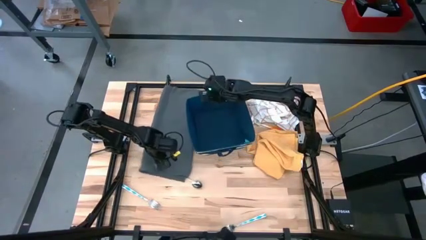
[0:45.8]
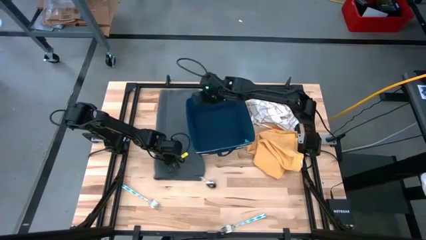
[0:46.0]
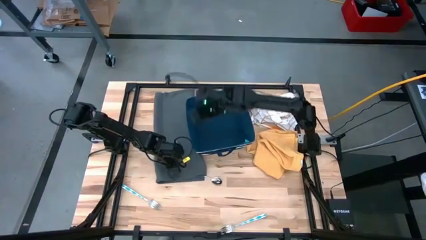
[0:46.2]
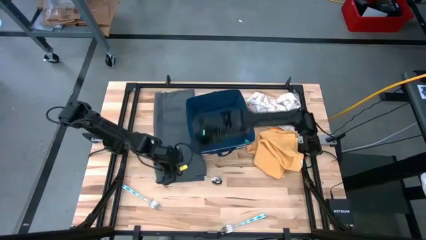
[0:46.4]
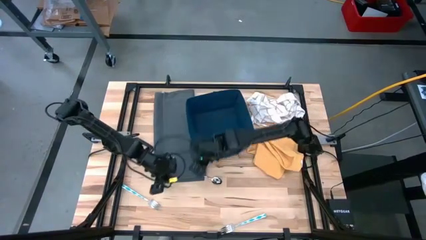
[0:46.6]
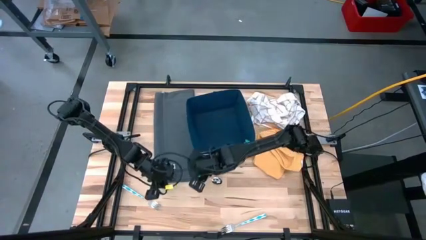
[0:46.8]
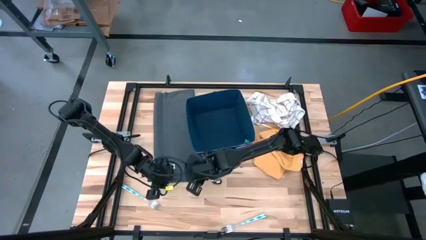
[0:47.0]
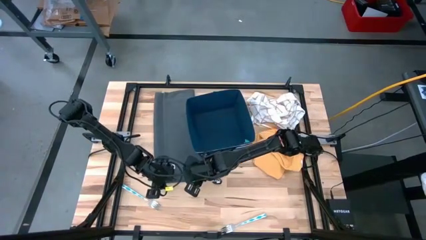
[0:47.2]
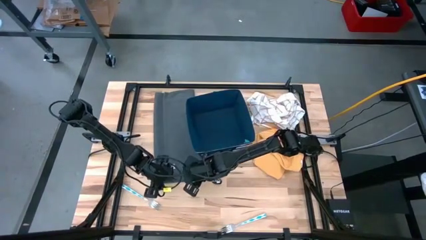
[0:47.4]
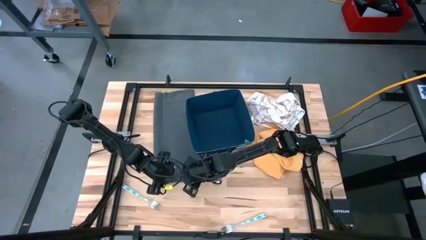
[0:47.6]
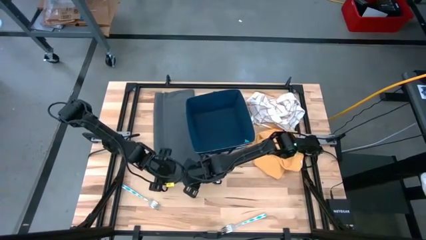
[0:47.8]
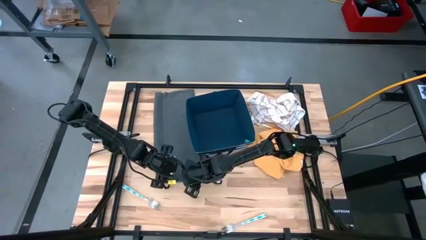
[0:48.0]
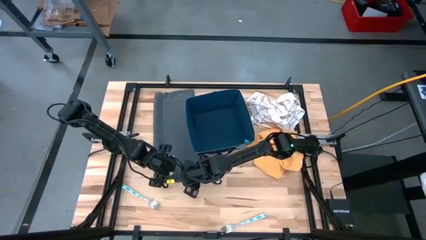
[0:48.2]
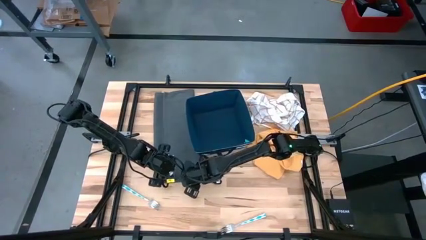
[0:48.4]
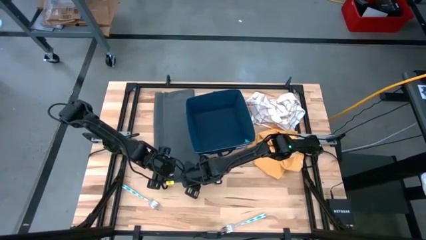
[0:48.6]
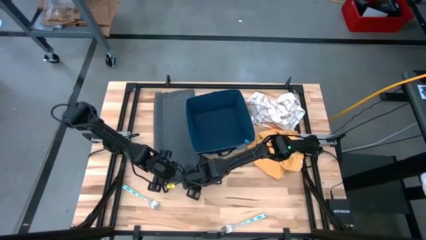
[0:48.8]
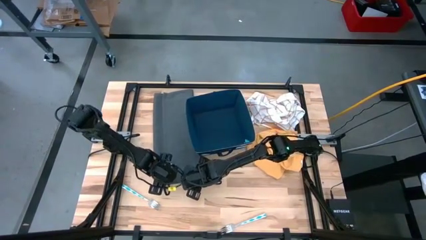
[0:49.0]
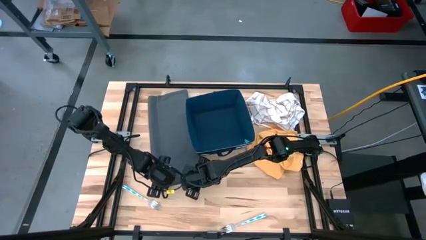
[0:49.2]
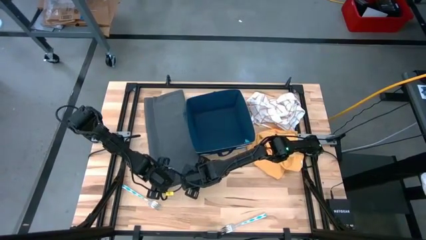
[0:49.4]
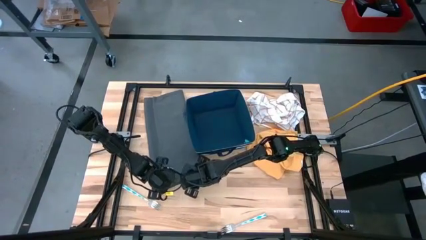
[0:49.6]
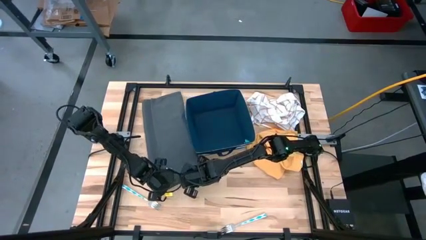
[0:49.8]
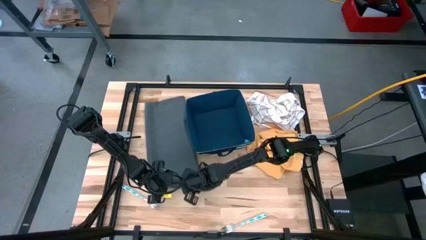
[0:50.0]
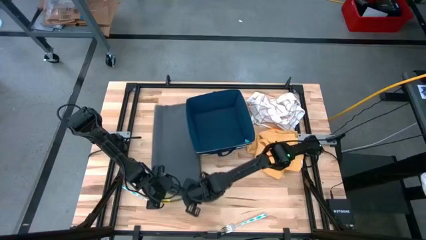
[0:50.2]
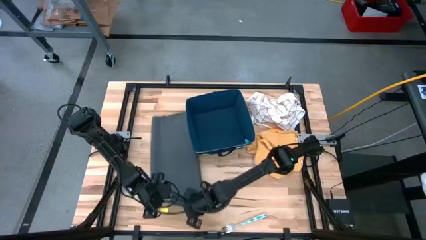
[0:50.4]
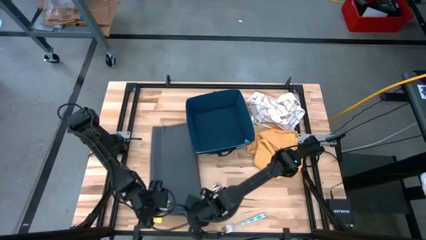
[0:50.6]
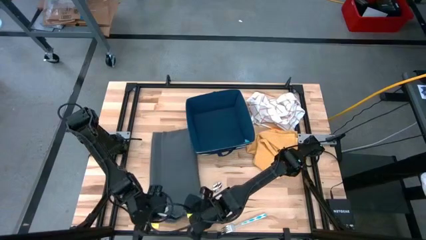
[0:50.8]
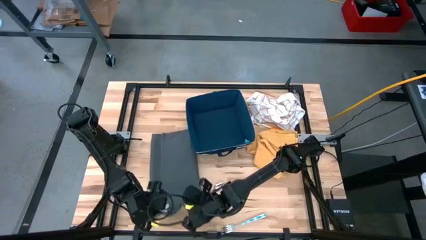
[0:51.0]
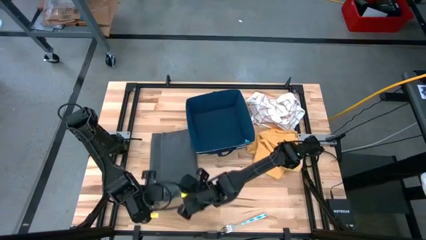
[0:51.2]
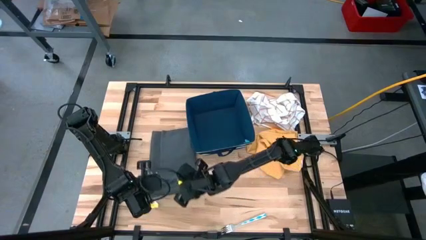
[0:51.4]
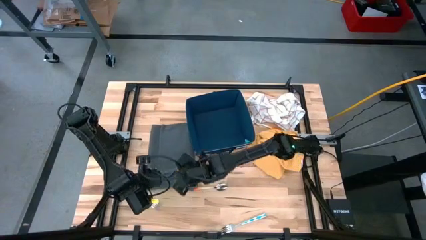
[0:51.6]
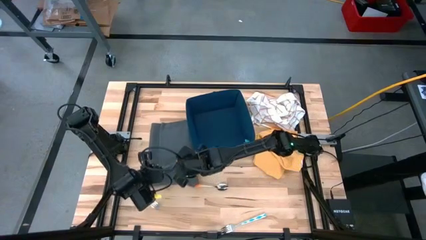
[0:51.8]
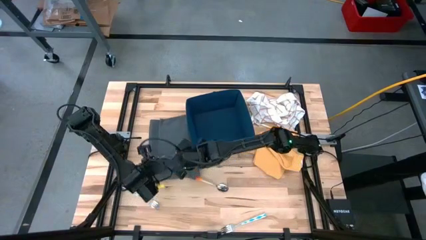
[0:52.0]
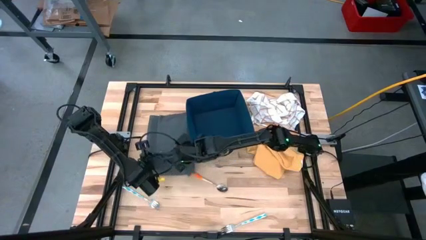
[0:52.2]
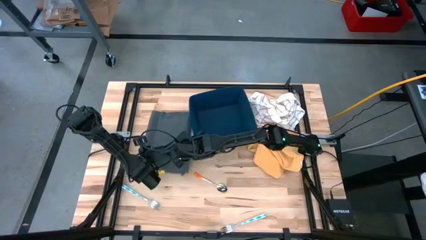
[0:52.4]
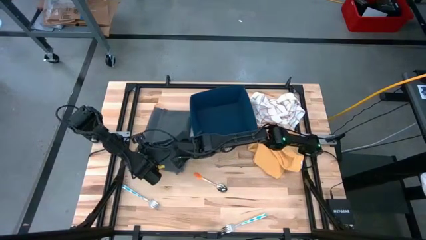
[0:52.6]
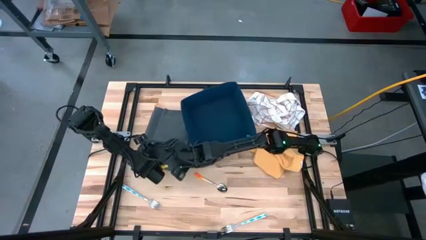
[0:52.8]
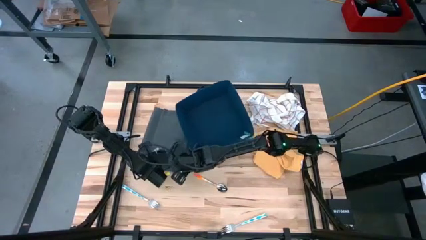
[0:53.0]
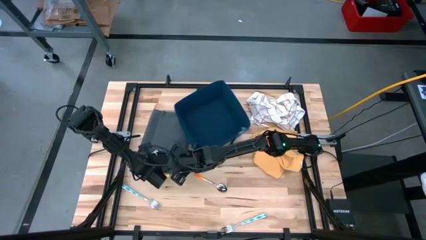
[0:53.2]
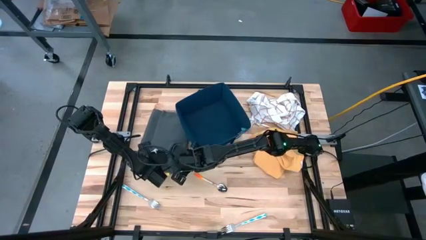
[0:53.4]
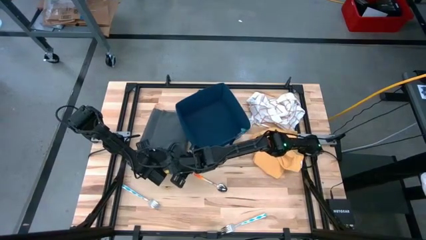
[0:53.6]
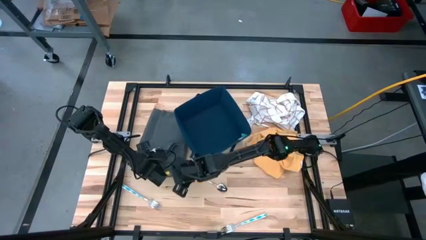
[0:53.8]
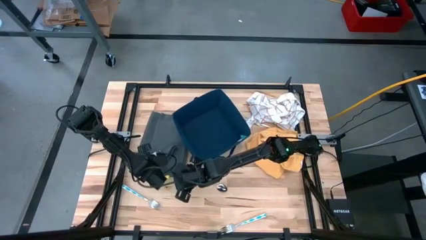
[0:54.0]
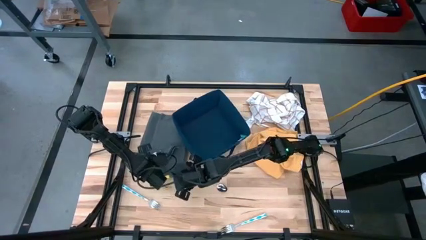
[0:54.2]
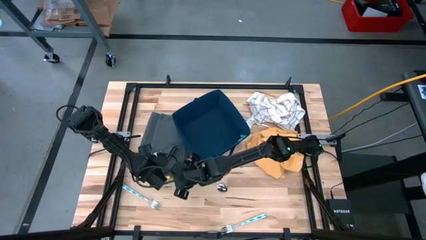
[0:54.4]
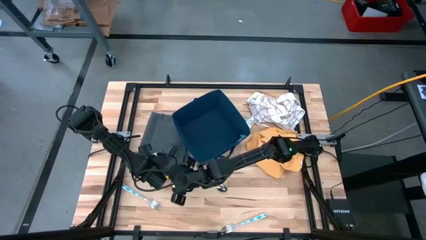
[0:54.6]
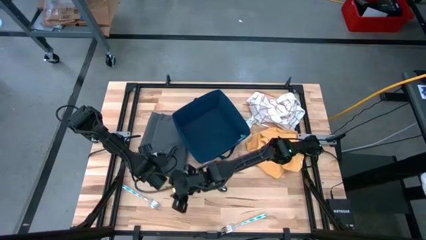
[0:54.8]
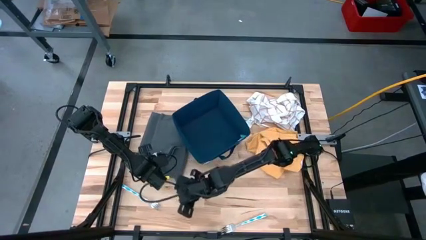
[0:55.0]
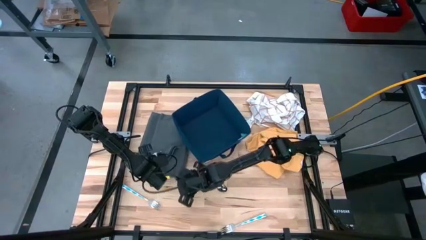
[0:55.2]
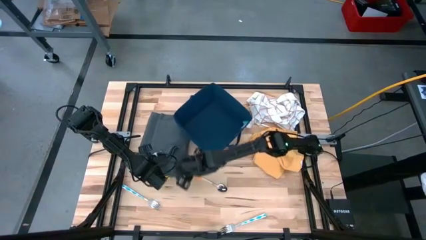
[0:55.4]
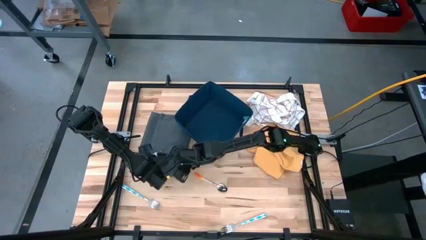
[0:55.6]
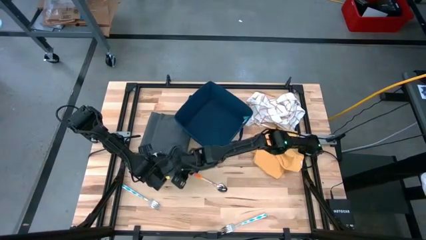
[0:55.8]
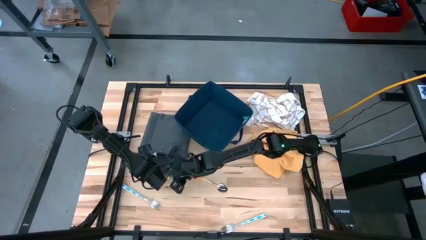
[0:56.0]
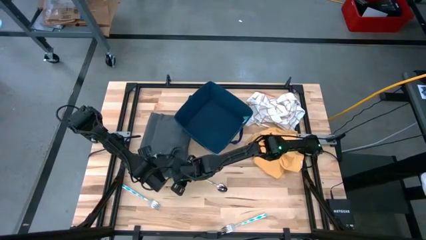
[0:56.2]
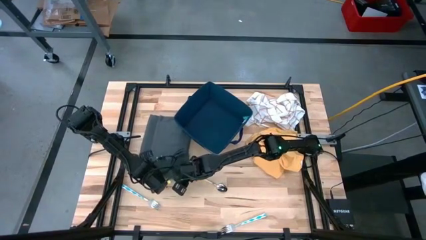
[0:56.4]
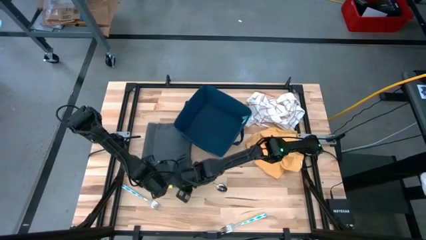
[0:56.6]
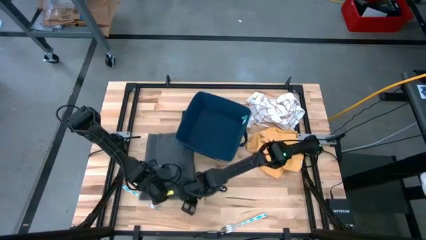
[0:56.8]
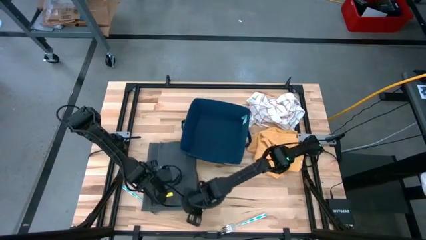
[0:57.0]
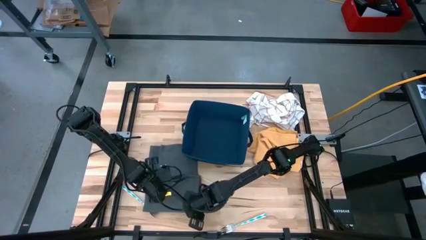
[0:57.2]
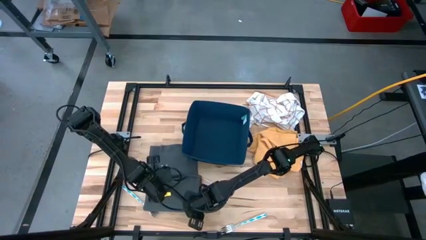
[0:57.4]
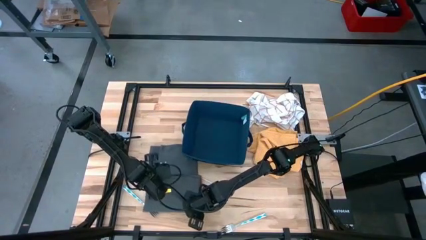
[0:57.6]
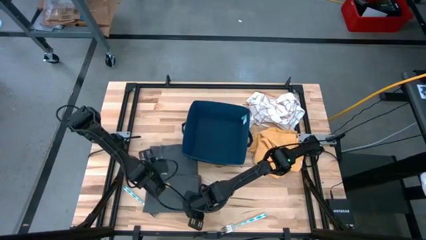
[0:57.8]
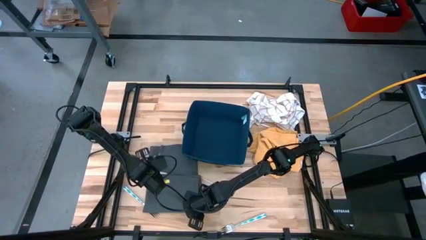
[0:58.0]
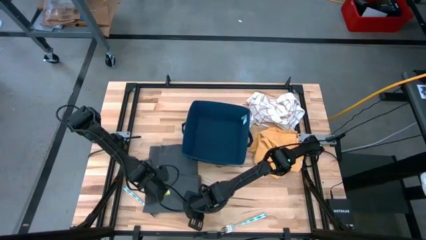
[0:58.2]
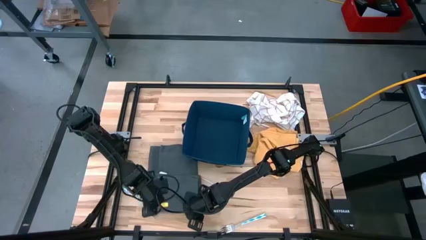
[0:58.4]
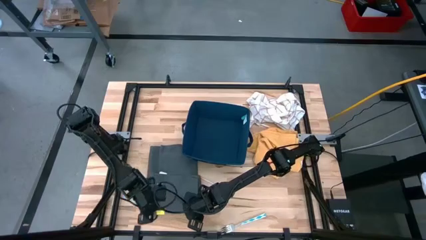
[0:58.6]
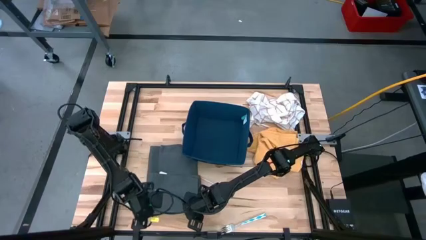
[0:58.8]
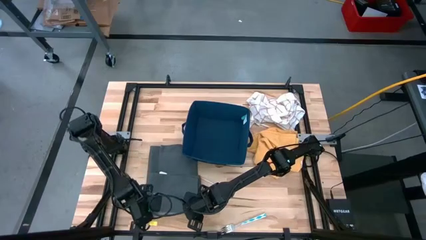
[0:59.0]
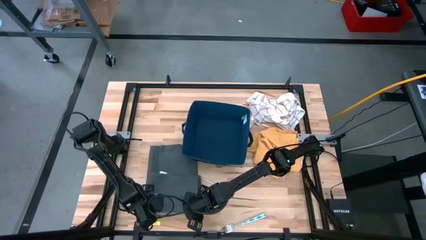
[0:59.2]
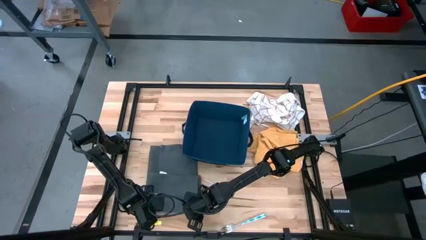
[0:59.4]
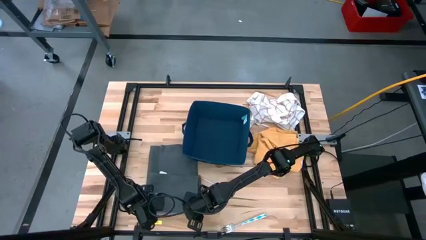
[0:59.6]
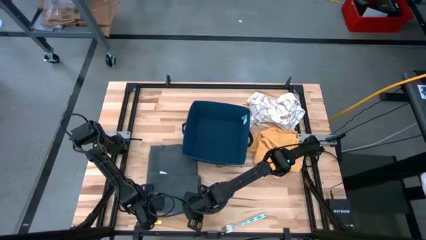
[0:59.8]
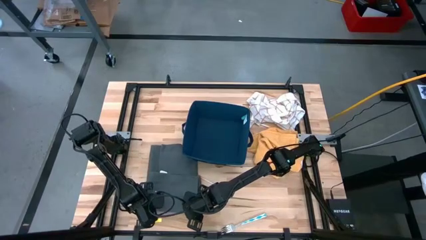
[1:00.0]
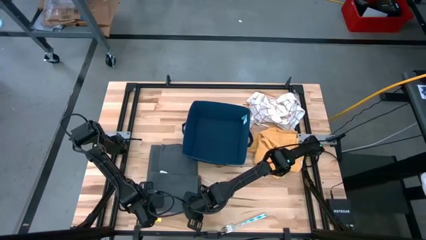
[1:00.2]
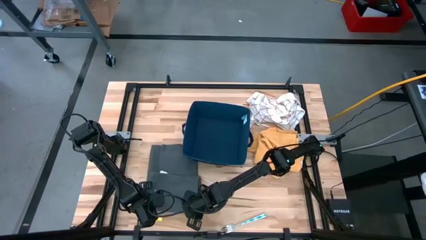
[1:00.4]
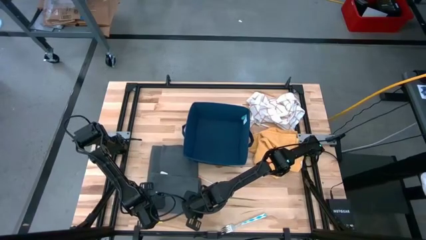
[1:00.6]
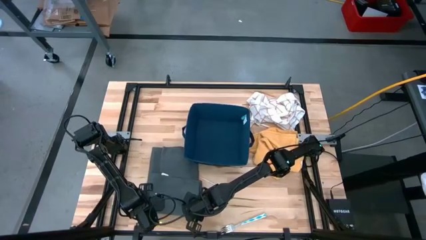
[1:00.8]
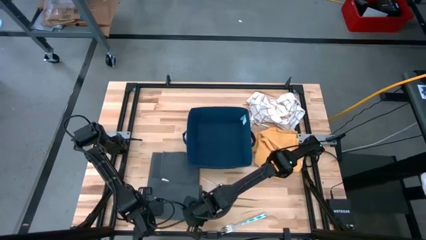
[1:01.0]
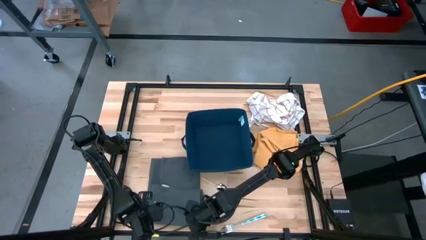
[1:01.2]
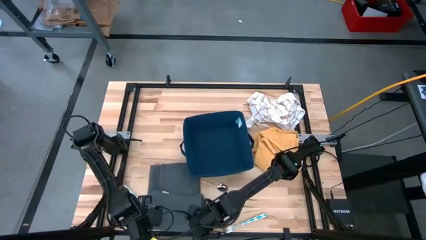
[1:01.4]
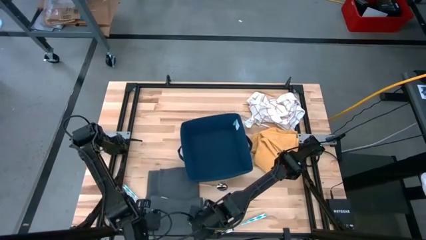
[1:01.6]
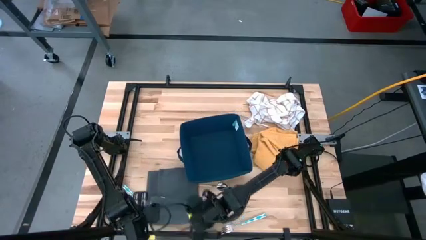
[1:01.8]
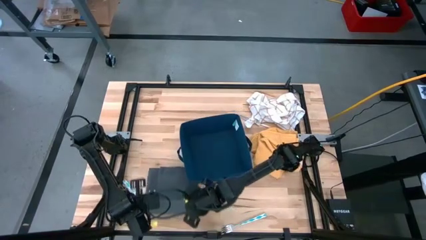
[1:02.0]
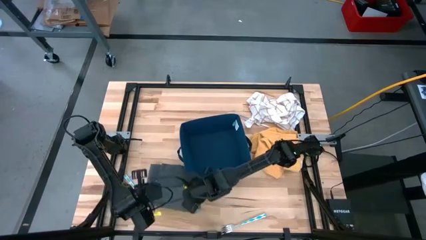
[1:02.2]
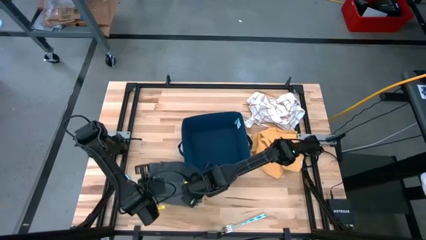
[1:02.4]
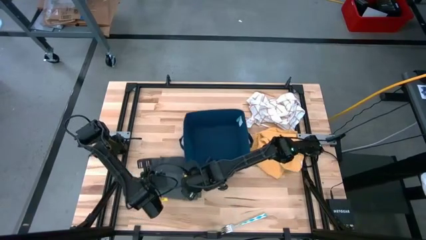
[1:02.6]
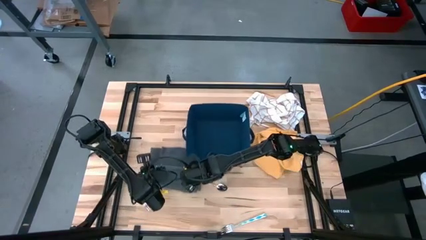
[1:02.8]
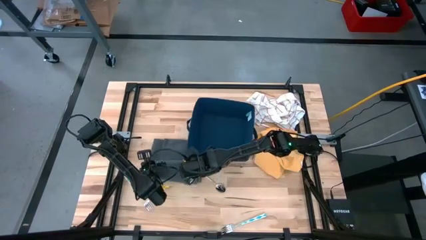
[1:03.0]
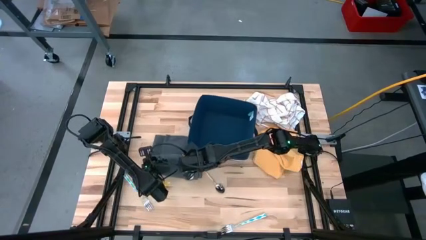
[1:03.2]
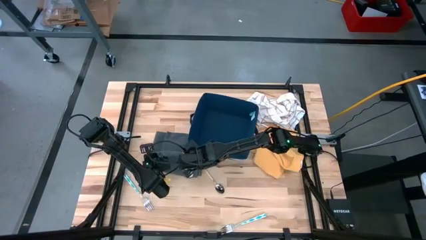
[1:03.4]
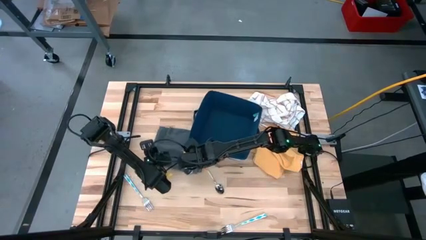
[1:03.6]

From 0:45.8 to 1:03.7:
Task: Fold towel
Fold the gray towel
